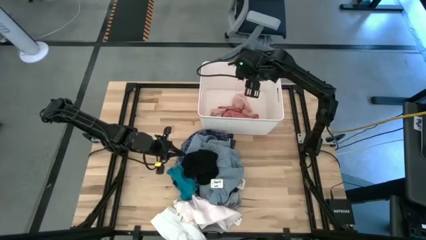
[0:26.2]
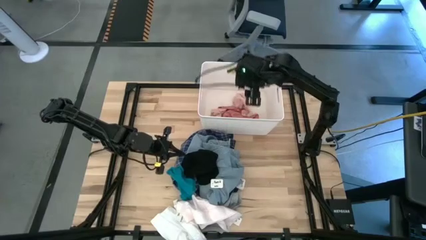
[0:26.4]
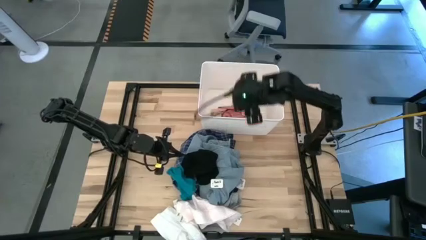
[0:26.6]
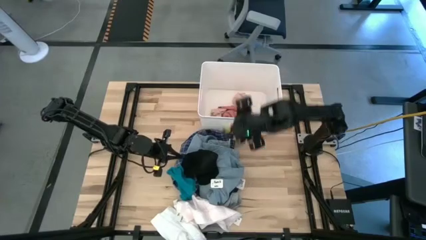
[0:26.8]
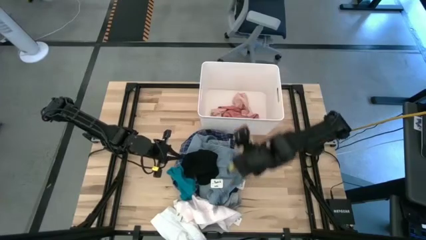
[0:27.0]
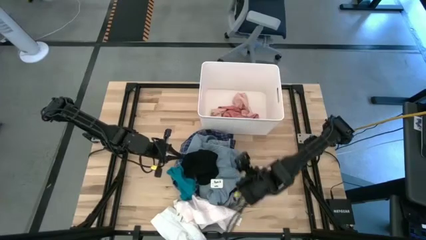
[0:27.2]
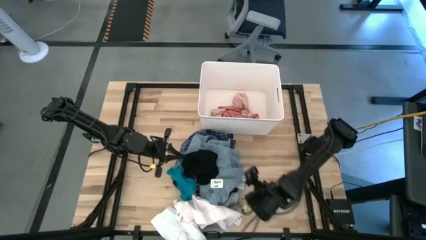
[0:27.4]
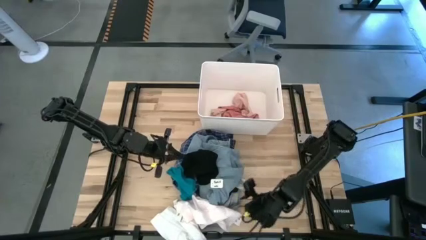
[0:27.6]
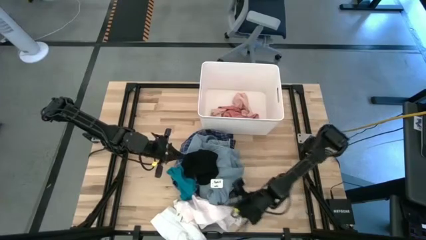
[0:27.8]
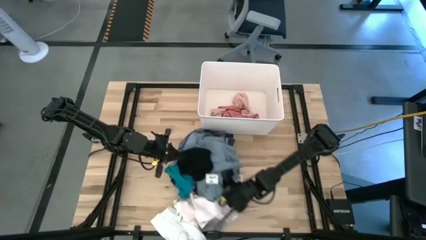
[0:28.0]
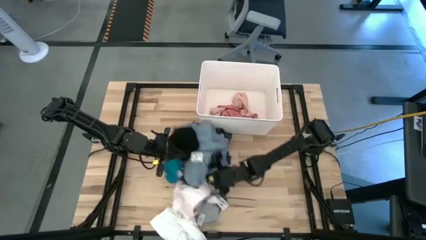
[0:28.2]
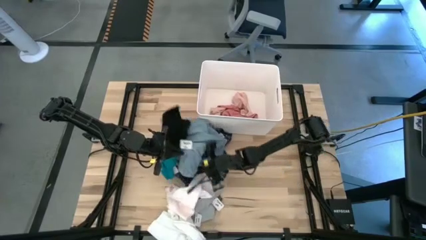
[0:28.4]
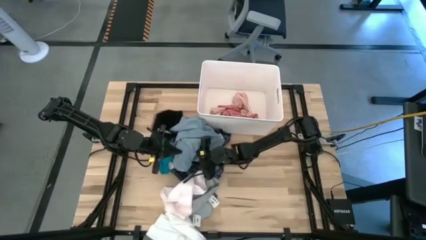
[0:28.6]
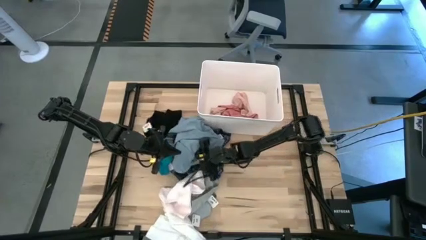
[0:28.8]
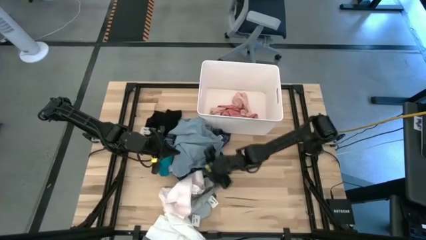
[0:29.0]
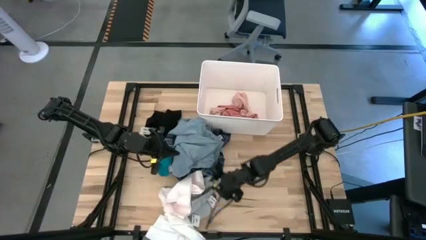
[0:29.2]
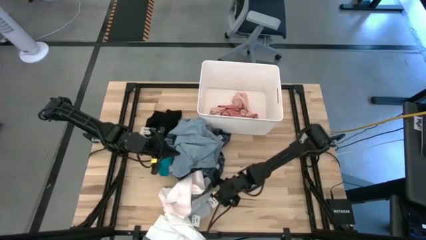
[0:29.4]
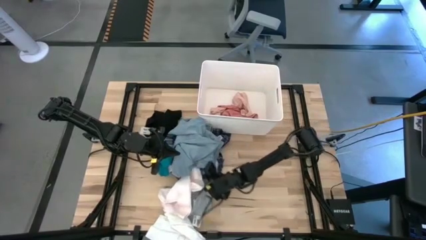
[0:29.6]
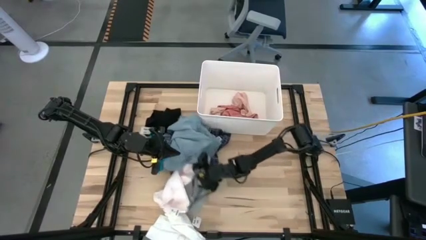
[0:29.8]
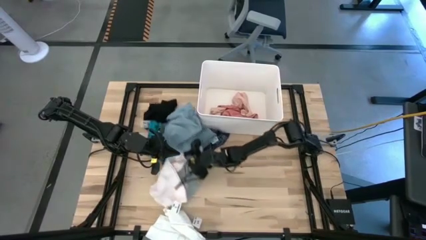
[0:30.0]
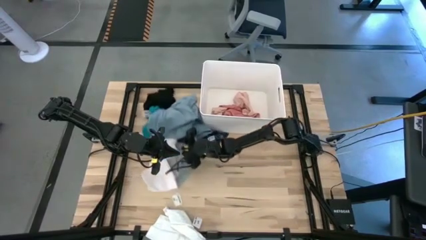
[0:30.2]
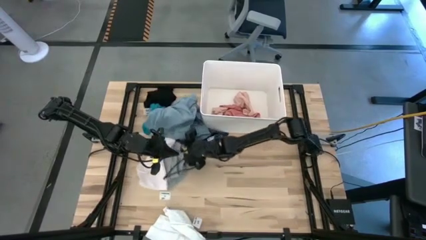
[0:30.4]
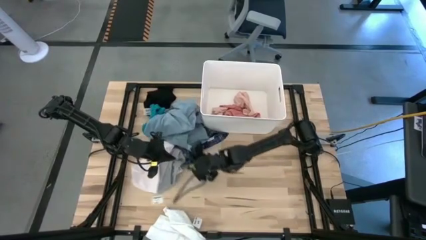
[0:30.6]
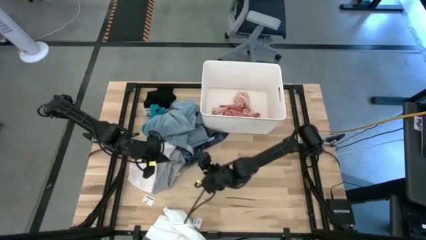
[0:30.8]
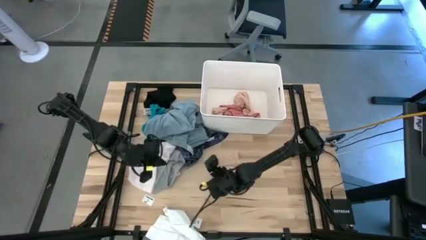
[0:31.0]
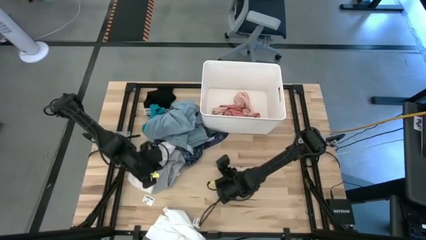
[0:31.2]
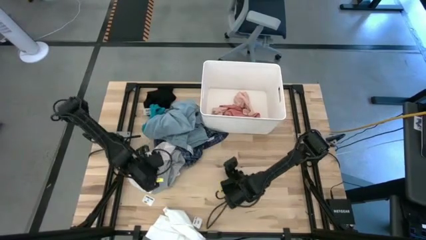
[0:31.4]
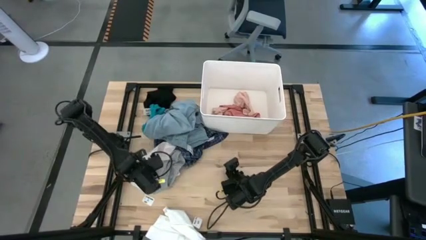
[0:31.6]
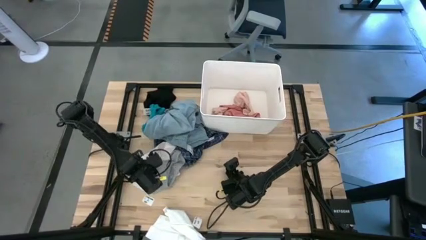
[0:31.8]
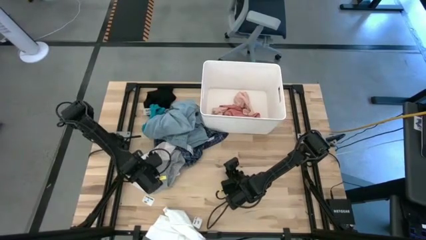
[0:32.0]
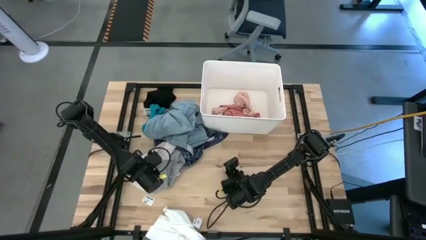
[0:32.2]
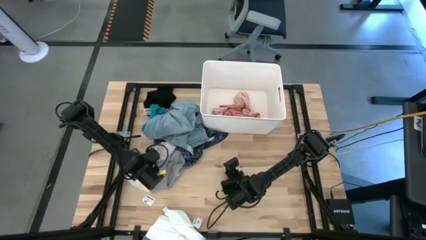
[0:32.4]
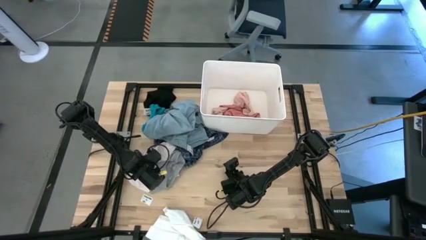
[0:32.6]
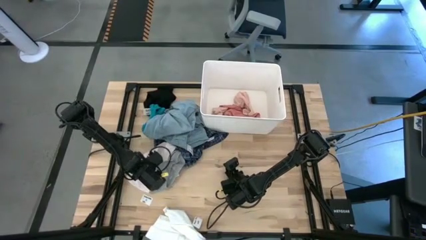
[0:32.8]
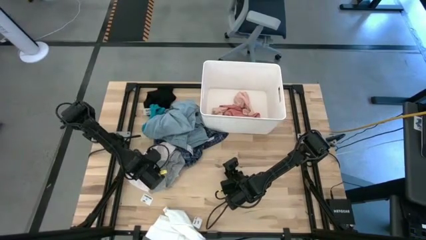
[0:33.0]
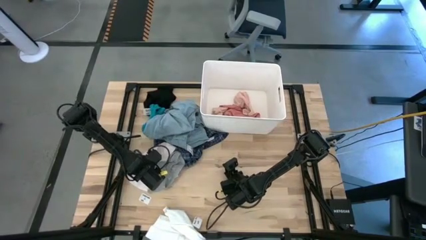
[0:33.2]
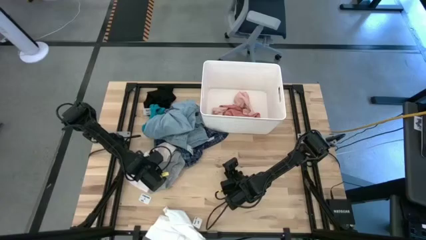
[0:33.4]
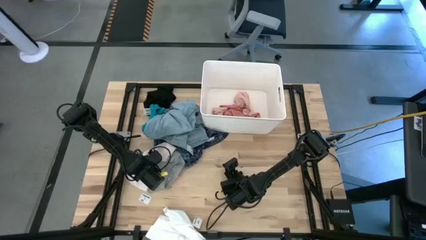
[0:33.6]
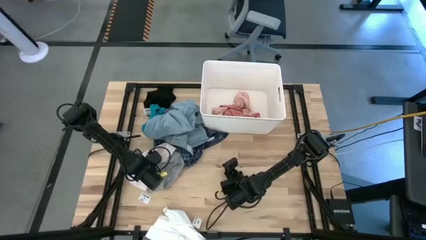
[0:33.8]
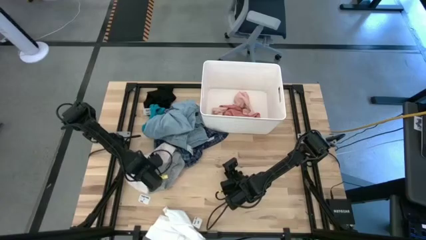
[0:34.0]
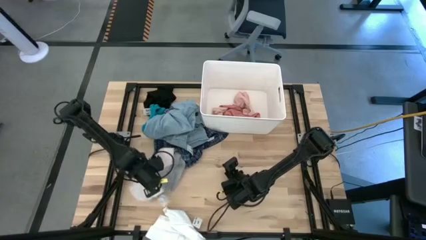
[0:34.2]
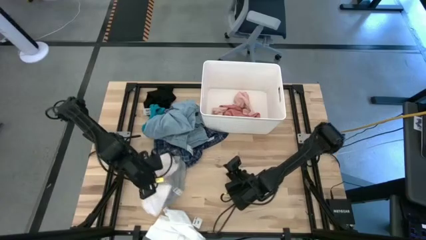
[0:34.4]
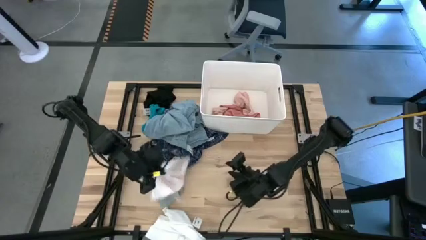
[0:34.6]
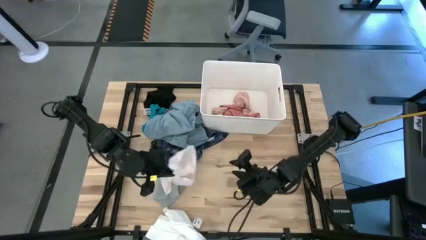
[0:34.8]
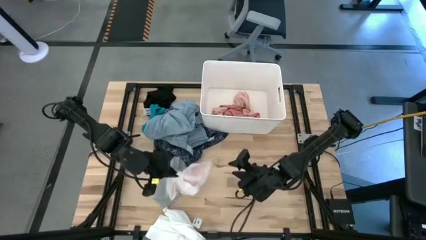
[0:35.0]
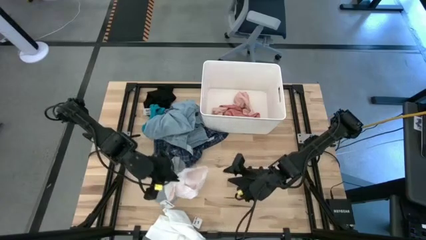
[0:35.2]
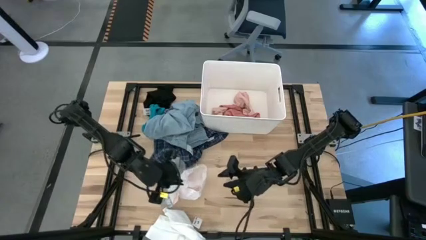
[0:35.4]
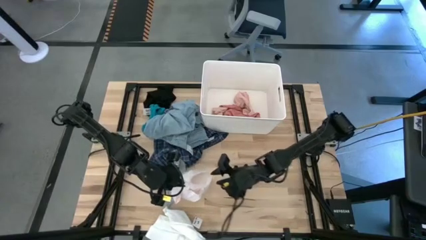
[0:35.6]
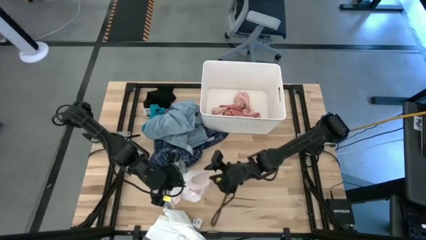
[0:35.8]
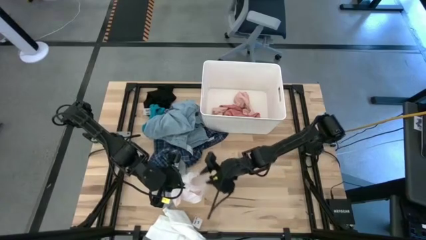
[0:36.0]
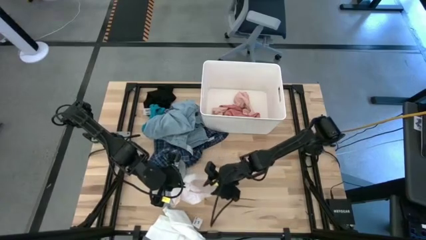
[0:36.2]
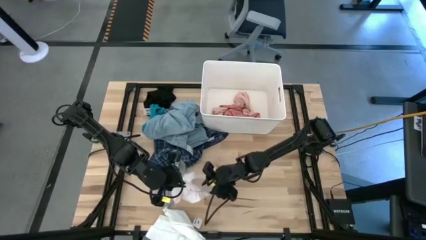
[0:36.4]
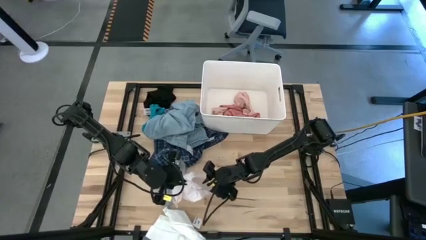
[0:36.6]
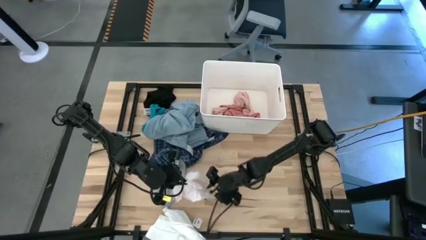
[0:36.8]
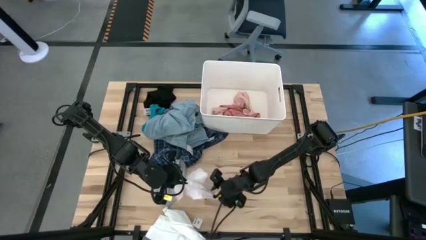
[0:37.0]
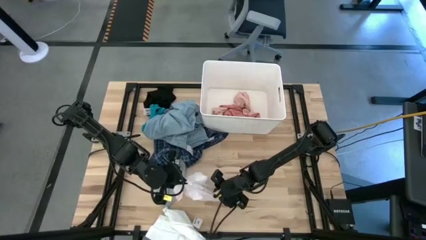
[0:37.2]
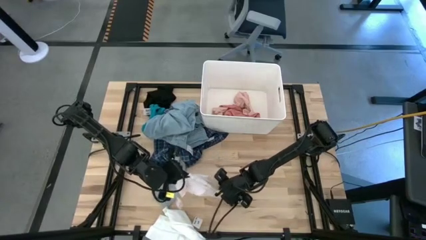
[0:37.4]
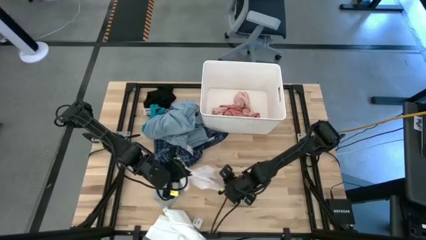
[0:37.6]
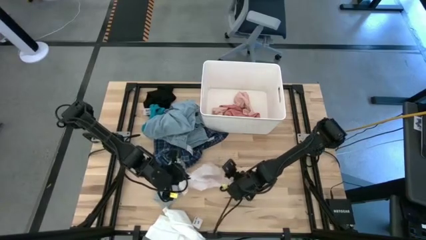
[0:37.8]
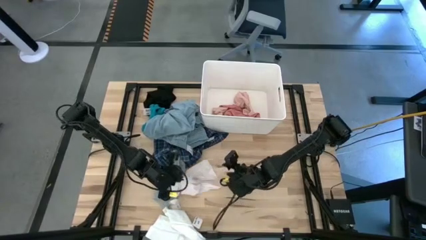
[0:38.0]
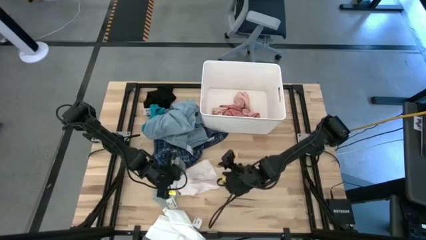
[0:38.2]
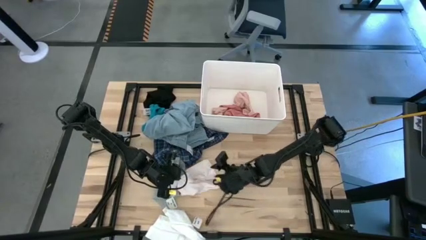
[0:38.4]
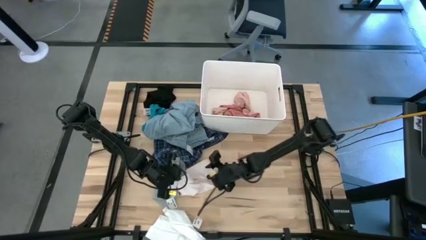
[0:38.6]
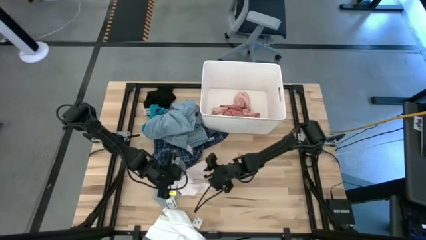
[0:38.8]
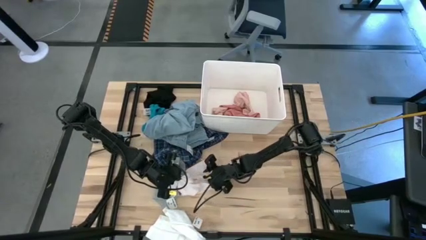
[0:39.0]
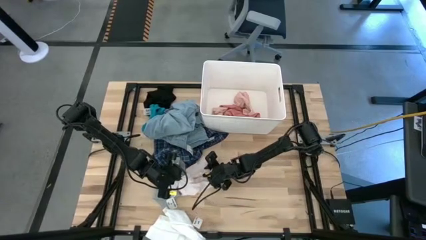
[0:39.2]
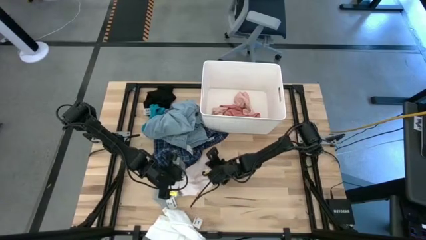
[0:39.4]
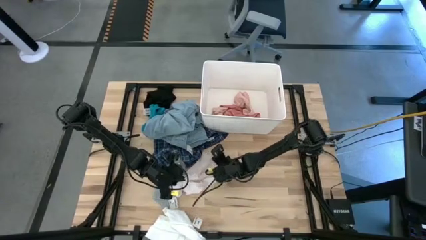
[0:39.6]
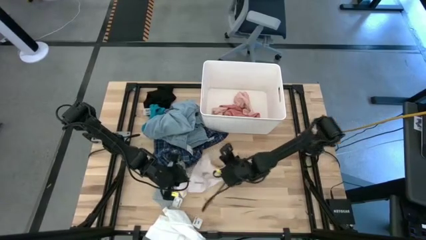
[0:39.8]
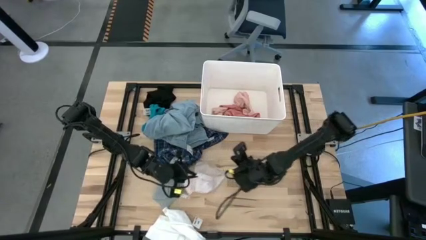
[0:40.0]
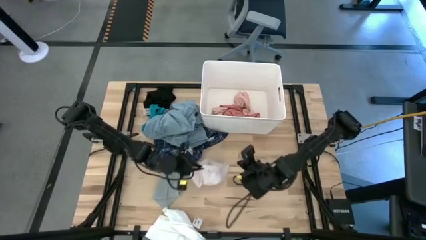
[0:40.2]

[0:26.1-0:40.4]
Task: Sort clothes
Put the white underwear into the white laundry bin

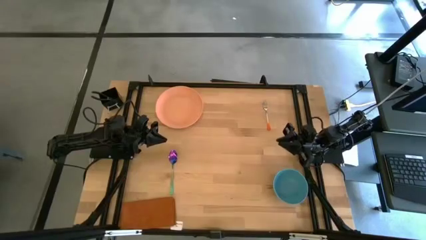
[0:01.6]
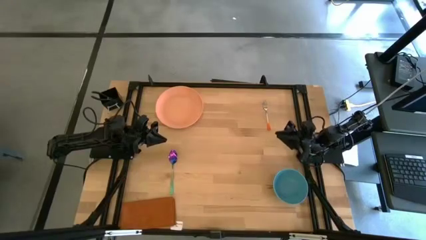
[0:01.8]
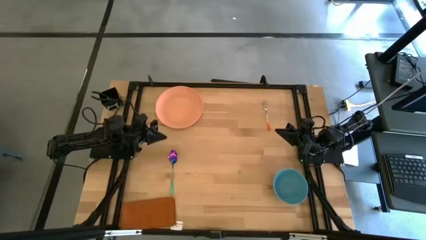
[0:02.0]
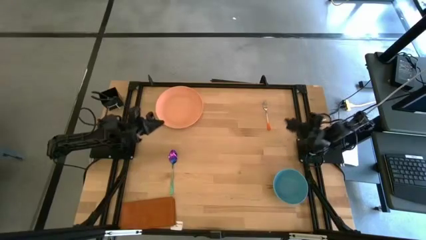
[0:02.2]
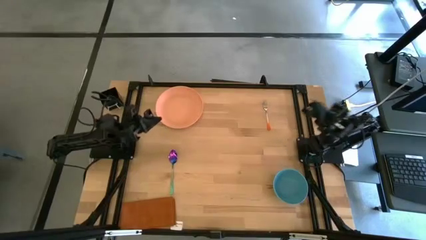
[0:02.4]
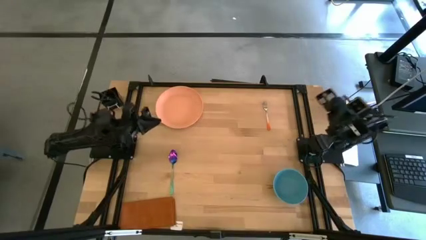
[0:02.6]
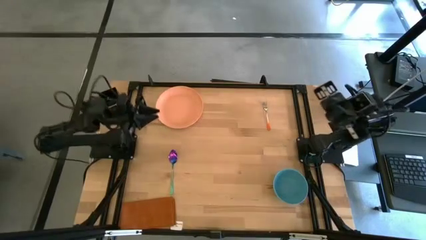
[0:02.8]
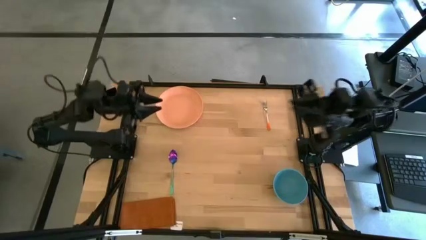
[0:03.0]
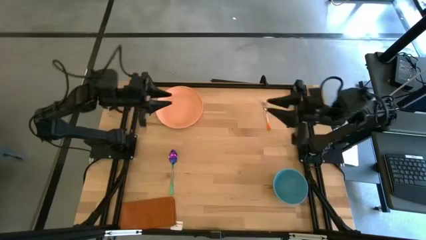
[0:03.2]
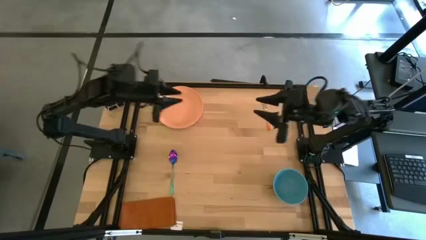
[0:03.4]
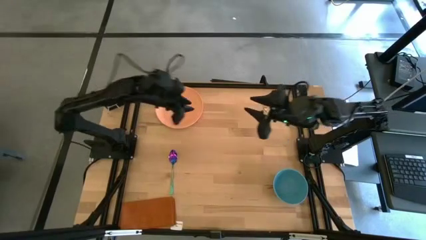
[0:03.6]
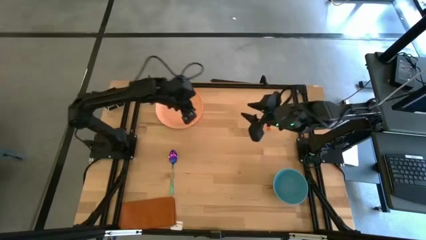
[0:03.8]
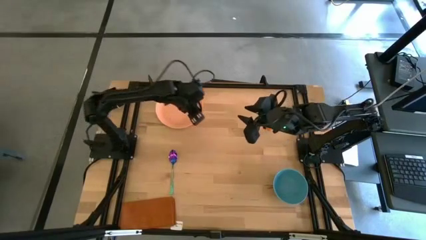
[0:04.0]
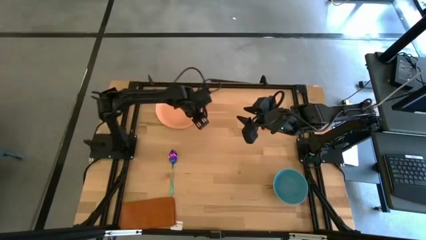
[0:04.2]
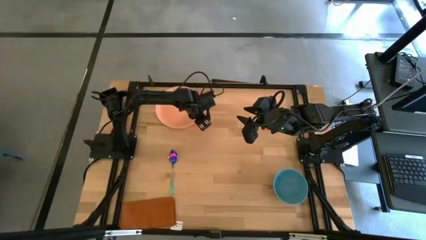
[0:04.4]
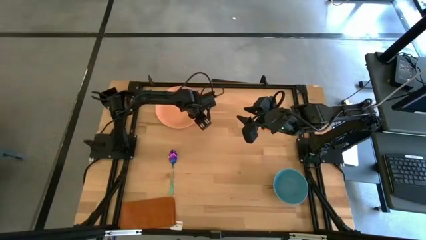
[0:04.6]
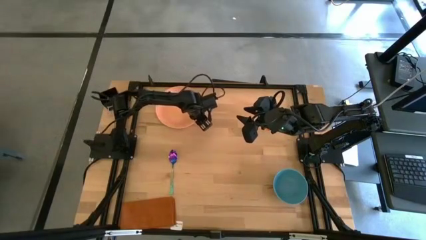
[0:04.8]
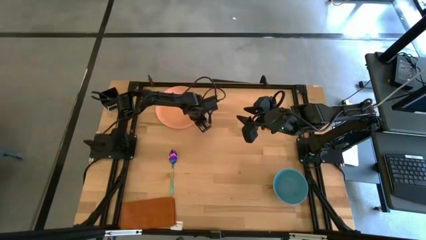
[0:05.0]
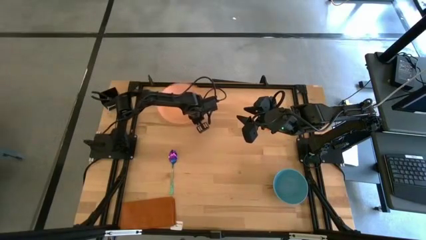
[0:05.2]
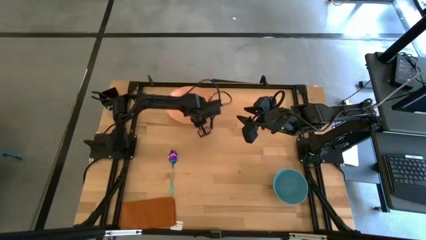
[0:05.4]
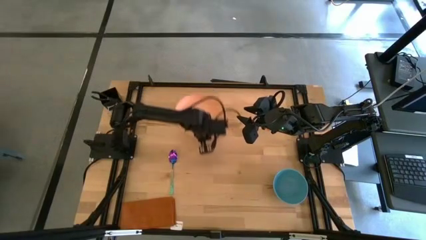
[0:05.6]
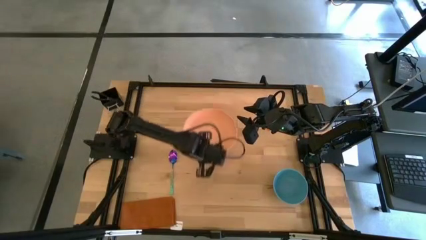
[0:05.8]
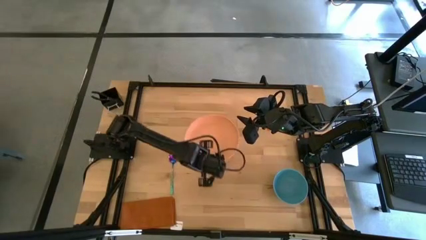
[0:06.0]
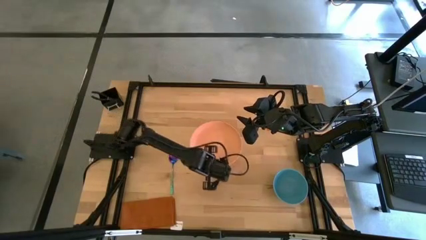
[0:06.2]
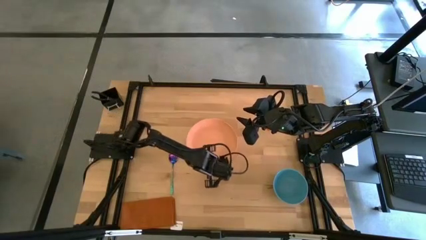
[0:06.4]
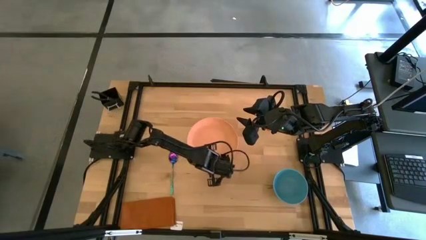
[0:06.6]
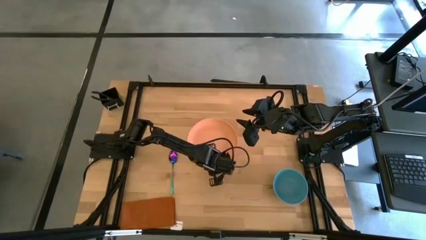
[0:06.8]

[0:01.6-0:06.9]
Task: Set table place
Move the orange plate to the center of the table
